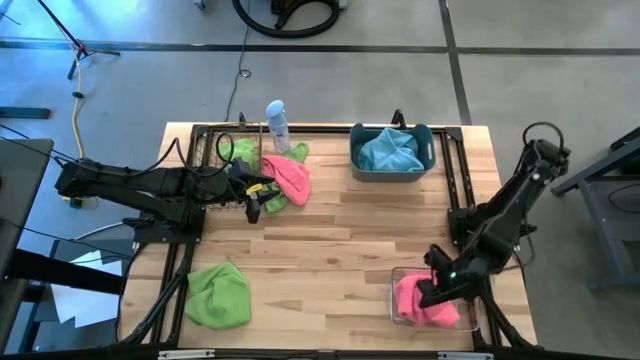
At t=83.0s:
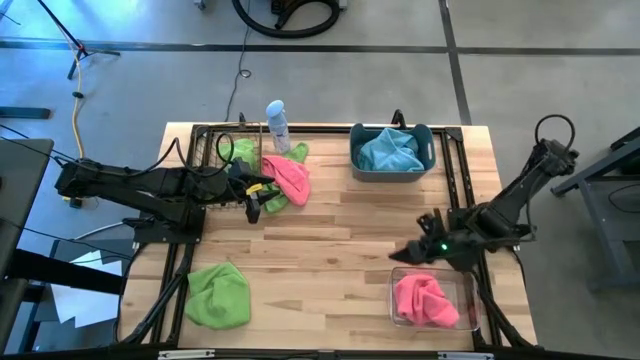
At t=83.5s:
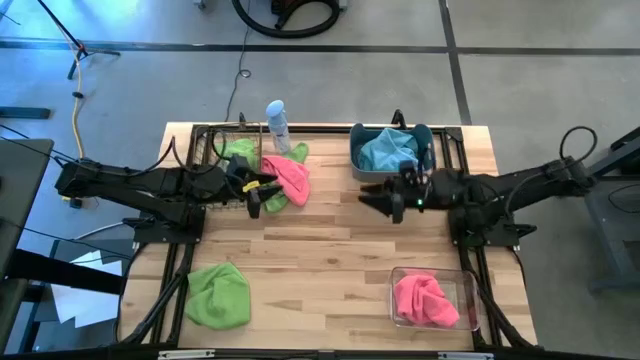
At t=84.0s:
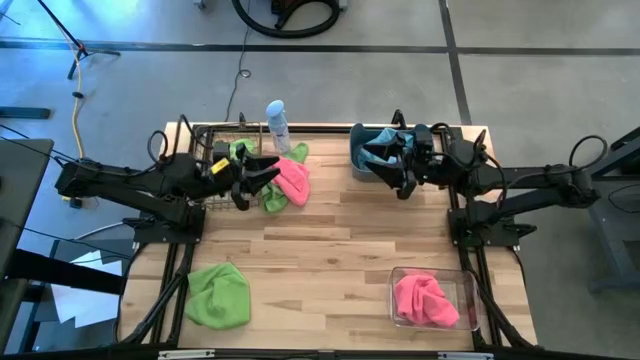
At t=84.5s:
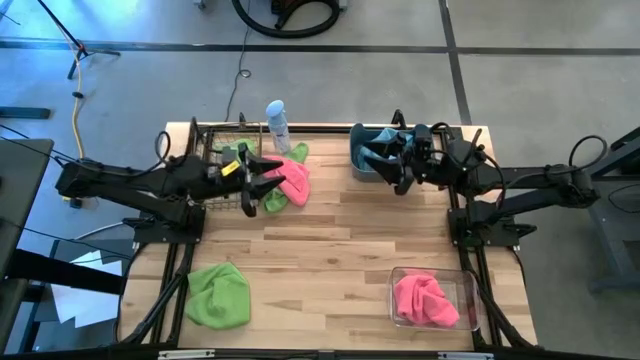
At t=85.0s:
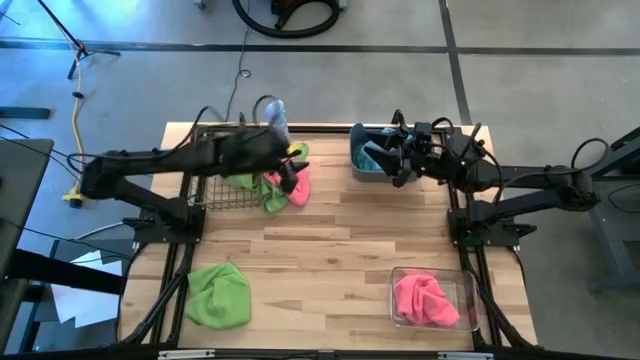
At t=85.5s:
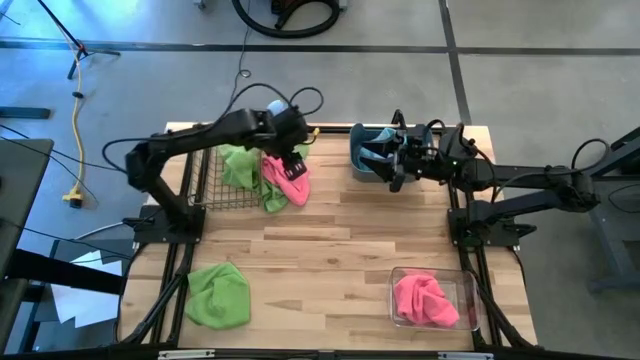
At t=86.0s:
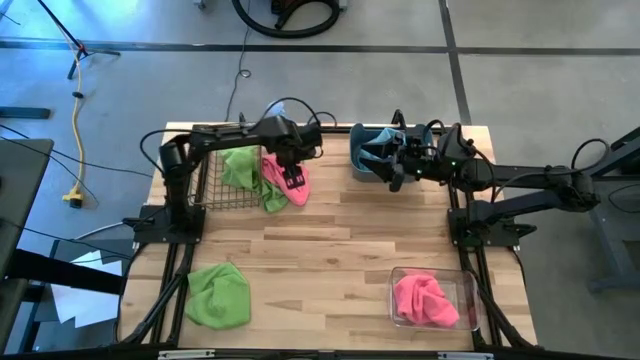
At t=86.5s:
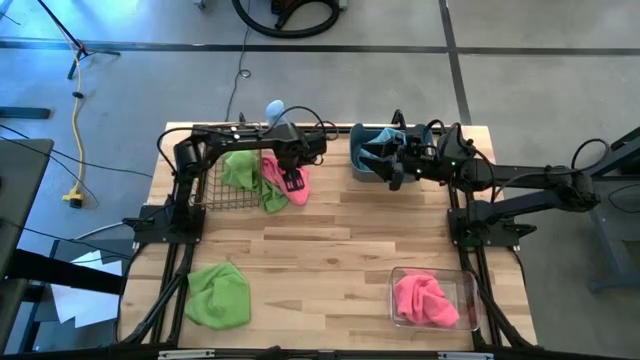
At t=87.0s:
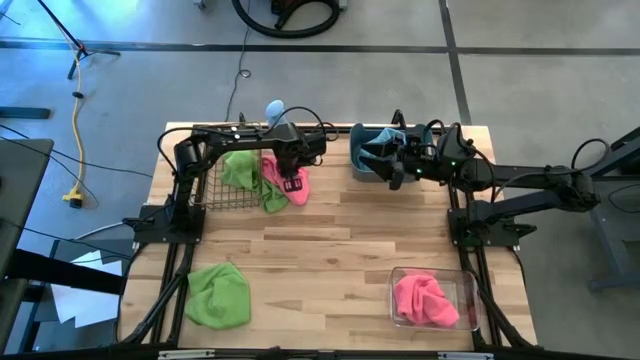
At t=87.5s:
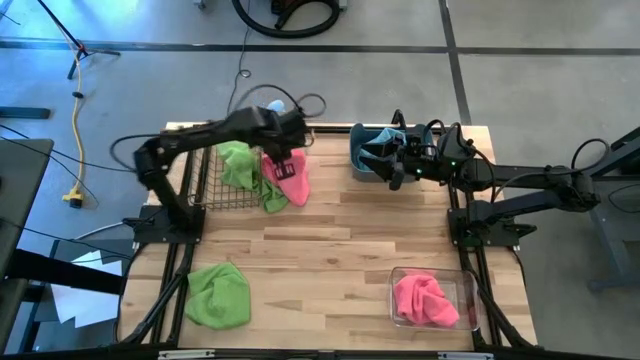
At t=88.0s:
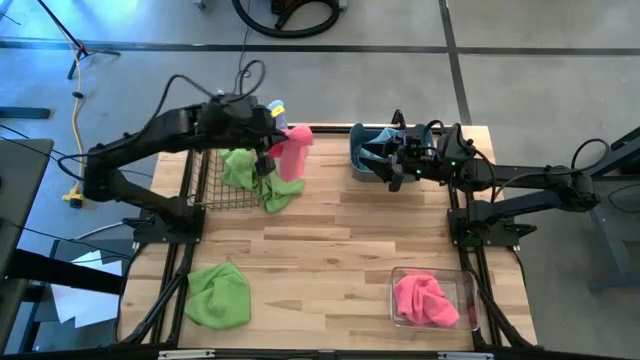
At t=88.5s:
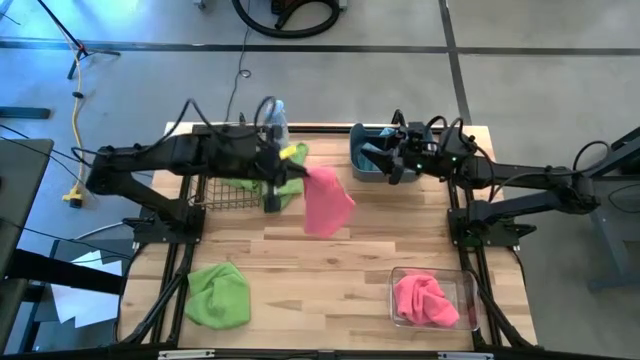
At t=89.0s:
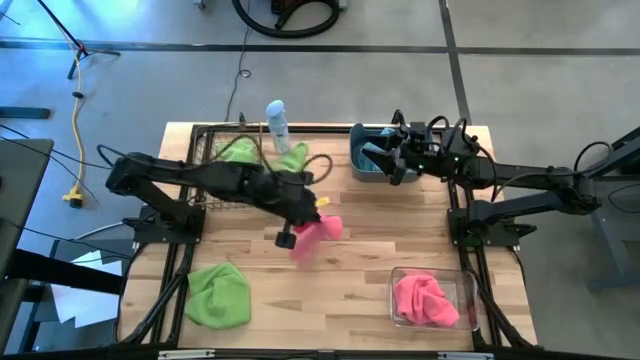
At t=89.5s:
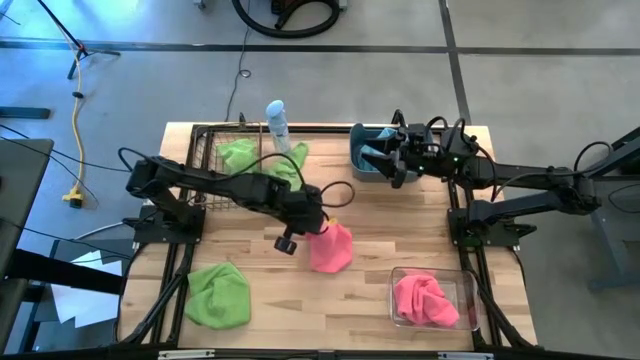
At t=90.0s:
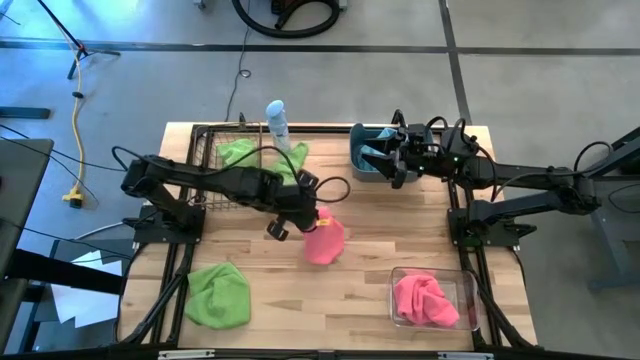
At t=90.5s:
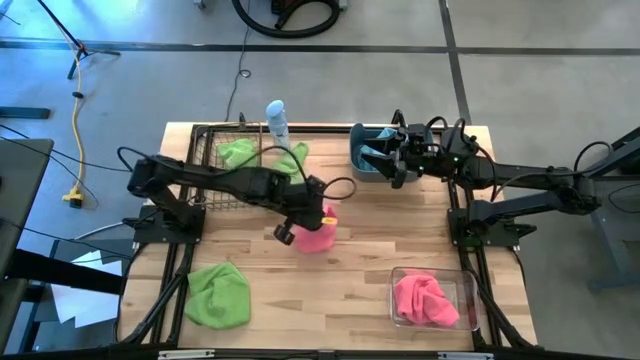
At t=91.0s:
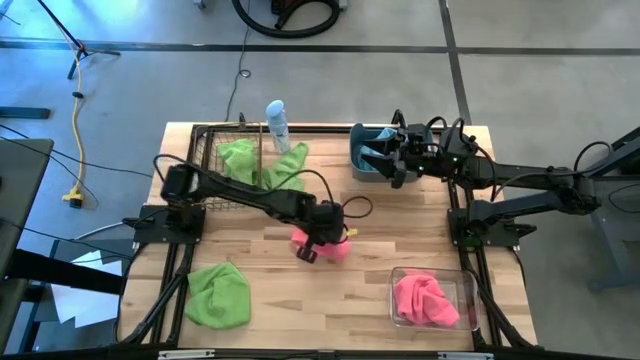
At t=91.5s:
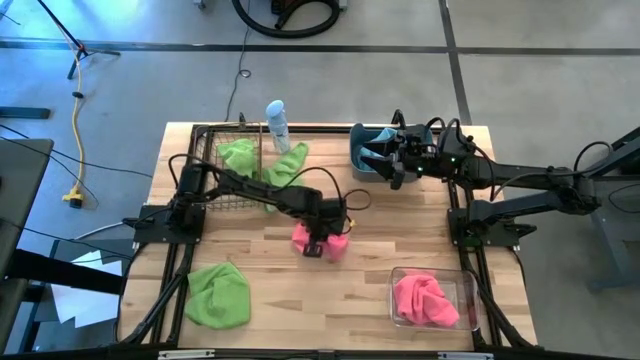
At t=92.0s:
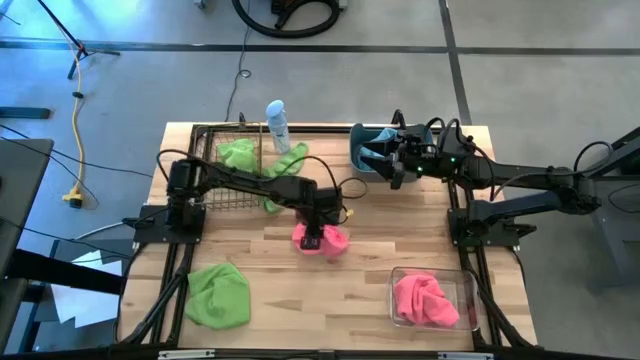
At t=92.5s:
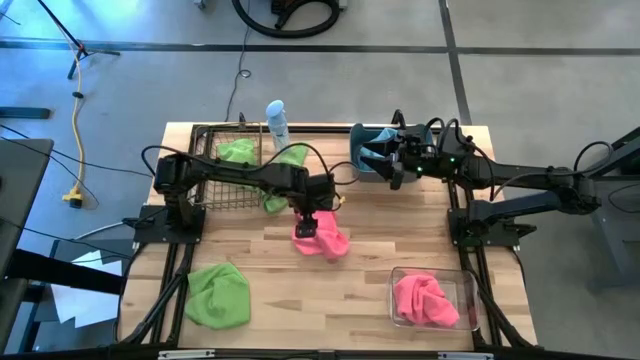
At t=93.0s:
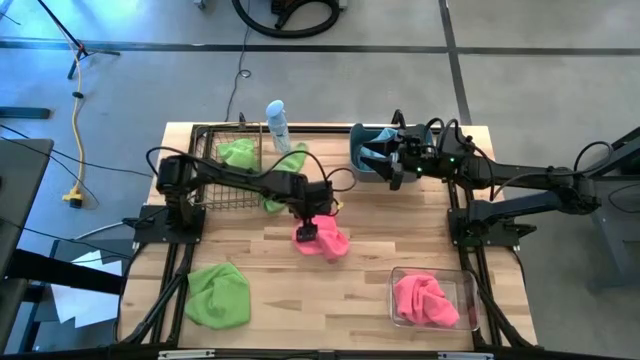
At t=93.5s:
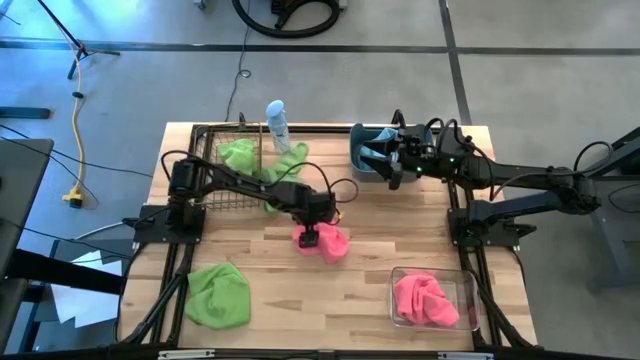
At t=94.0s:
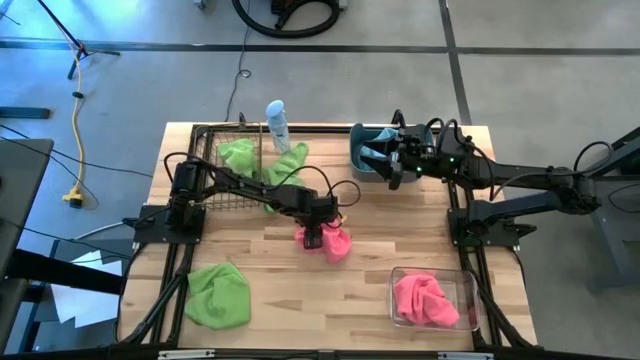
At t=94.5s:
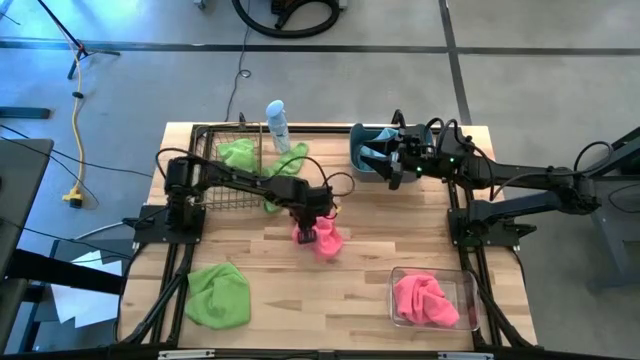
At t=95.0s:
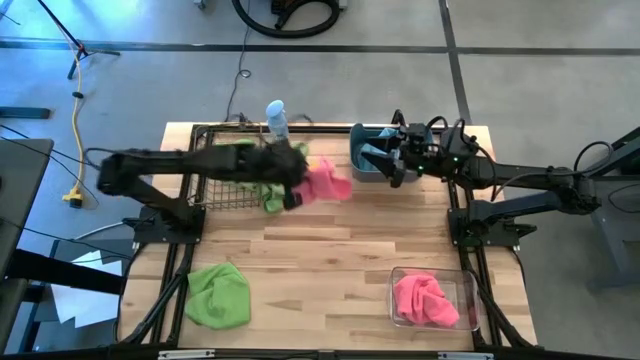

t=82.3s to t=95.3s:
Task: Sort microfiber towel by color & place in baskets
Put the pink towel into the transparent bin

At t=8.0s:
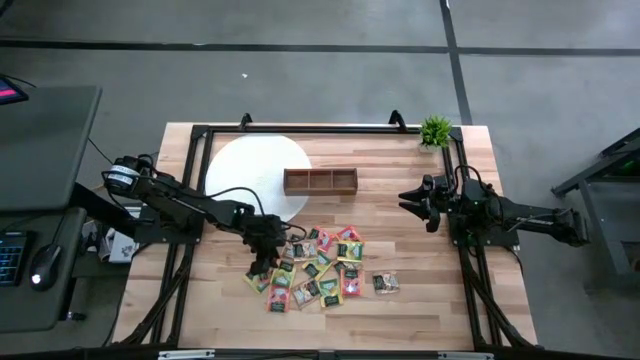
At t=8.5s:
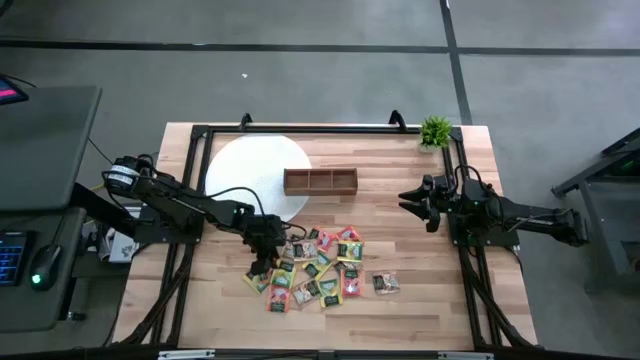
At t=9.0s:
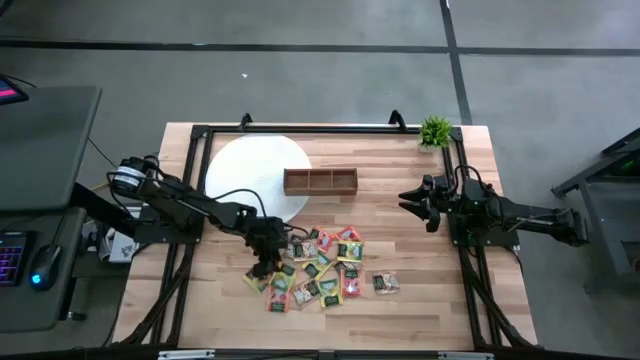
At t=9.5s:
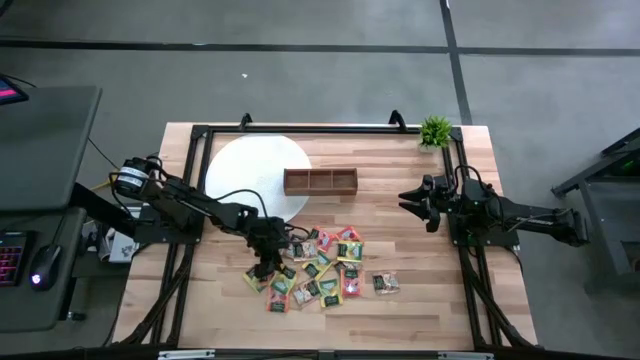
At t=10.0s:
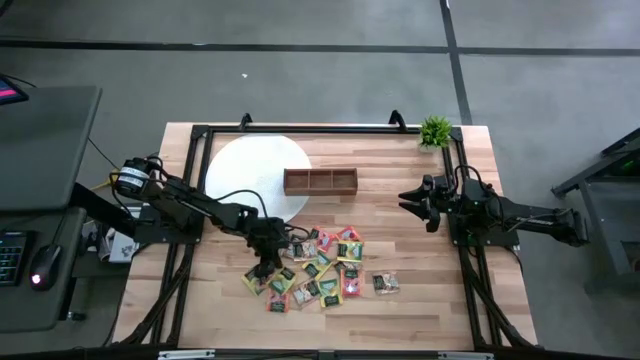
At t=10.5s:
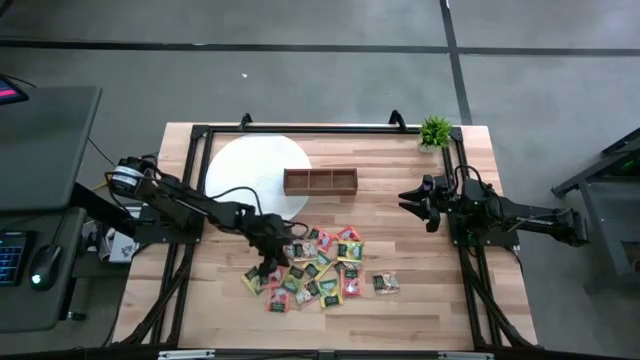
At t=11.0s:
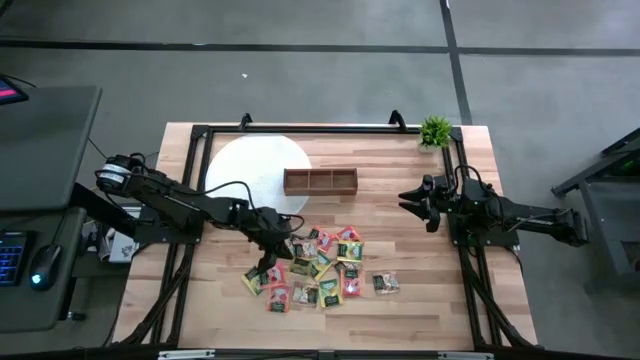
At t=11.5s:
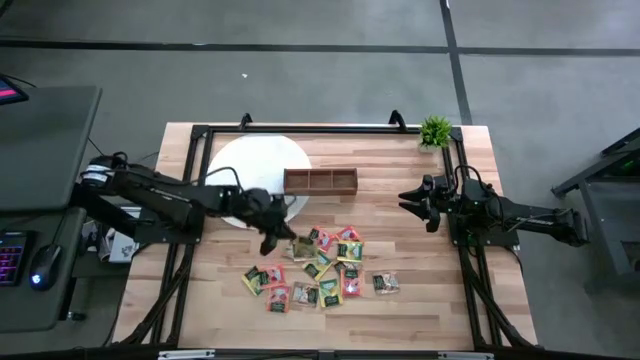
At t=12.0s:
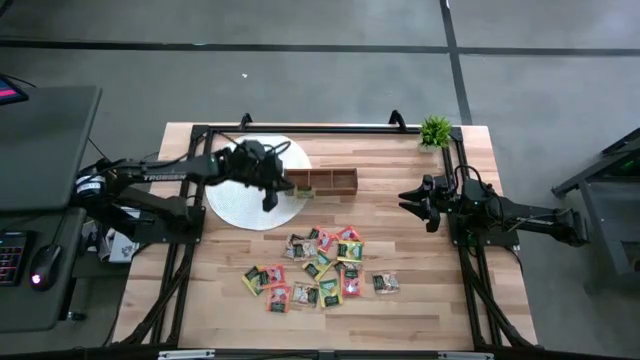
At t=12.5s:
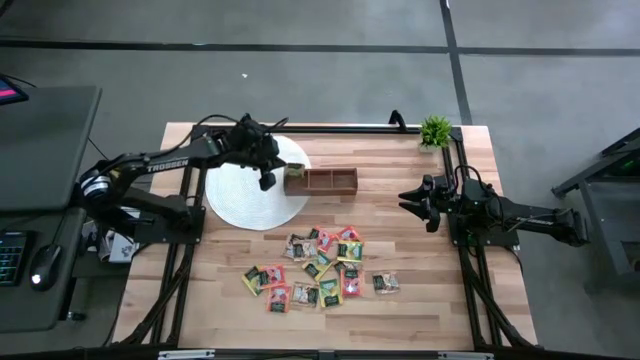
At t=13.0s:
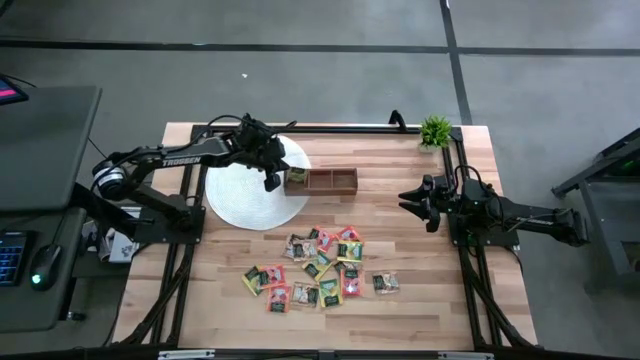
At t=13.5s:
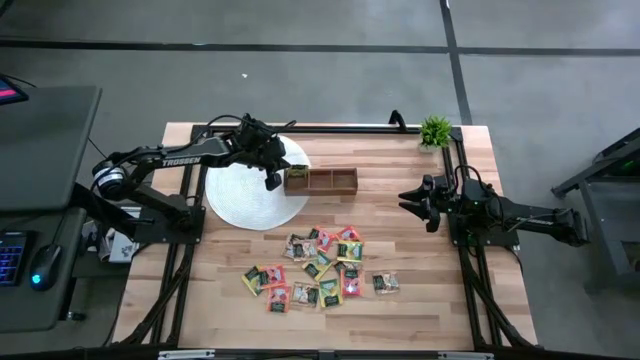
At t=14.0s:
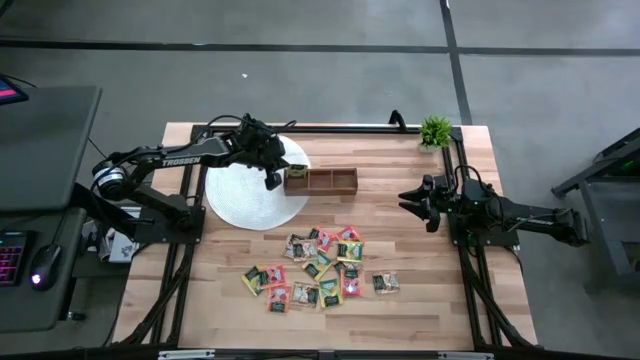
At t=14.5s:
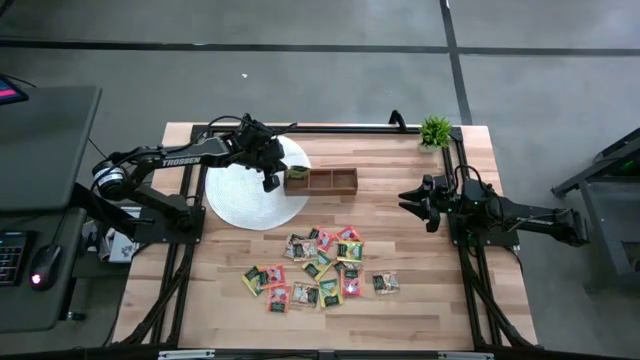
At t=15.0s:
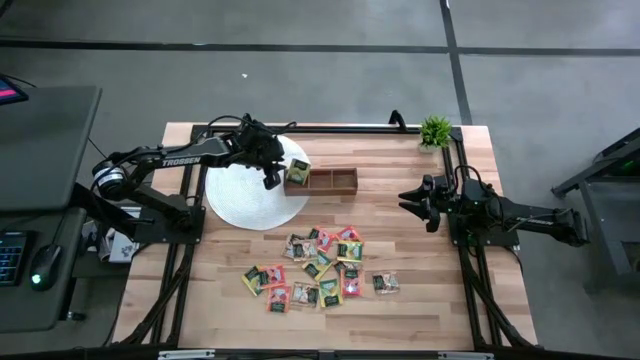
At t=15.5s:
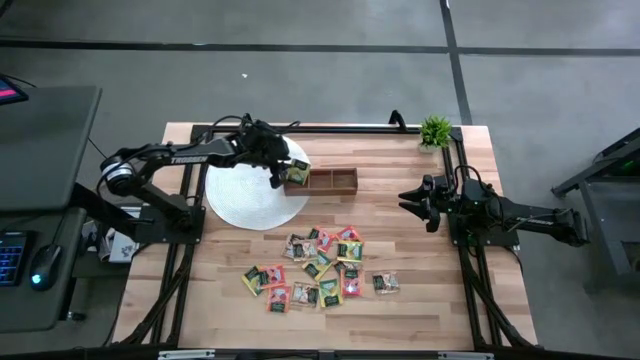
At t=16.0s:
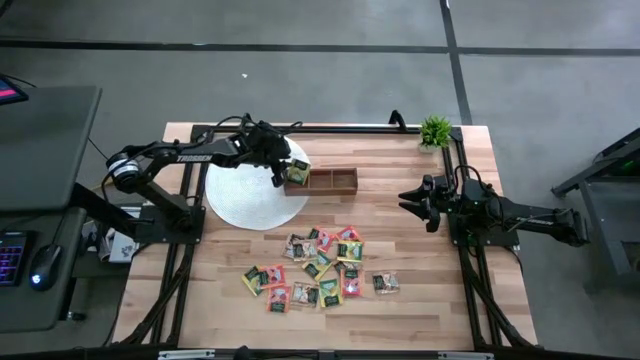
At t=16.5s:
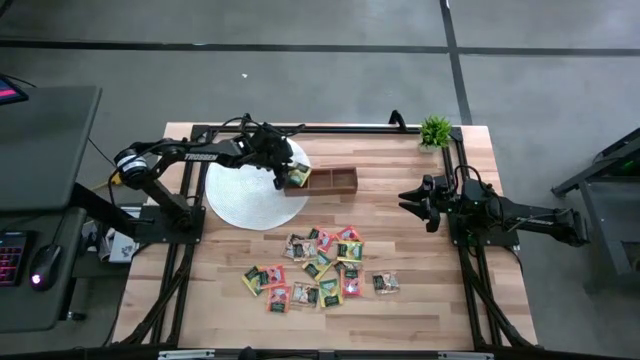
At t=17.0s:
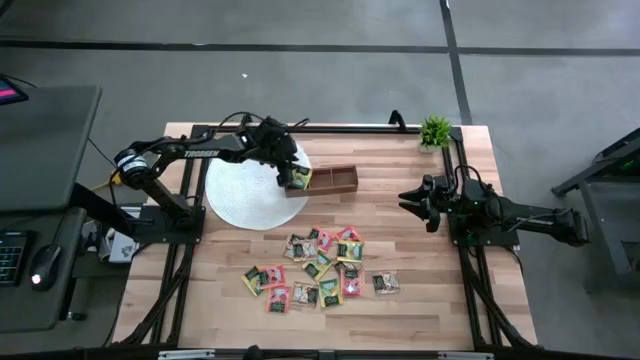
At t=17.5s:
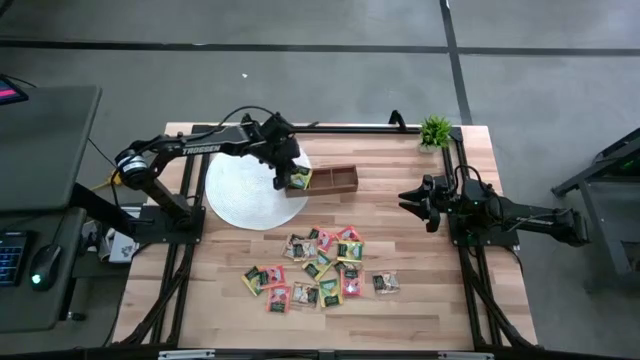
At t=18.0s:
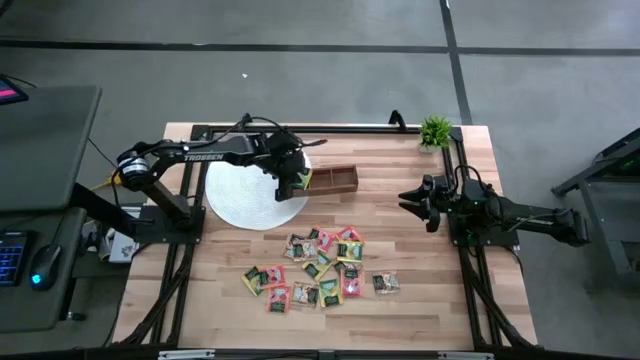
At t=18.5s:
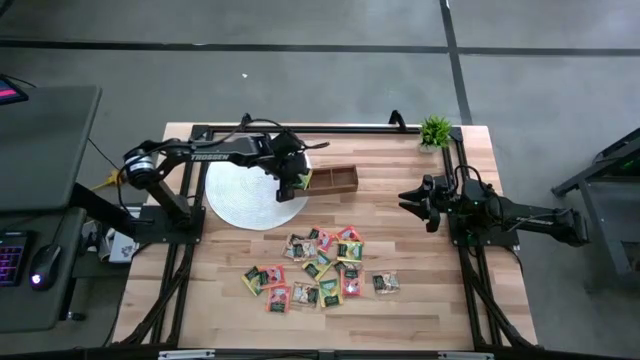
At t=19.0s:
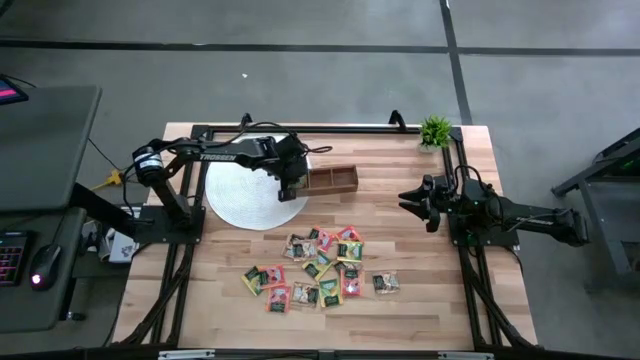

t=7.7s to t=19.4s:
Task: Pick & Place Tea
Put the yellow tea bag into the left compartment of the wooden organizer
